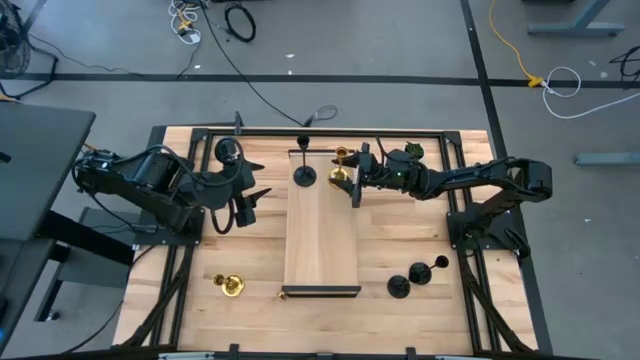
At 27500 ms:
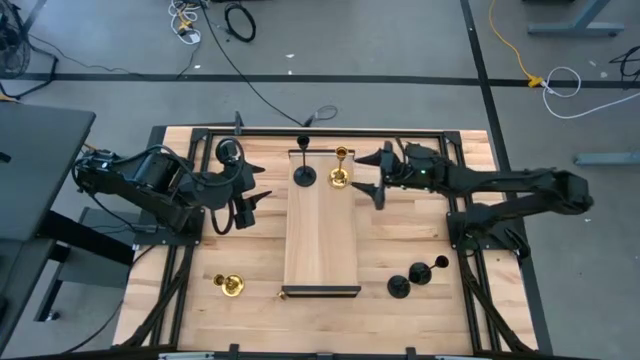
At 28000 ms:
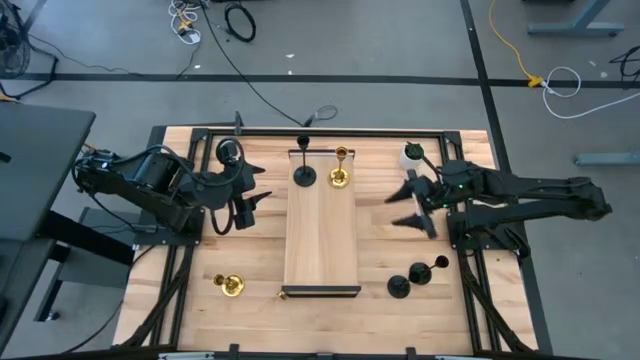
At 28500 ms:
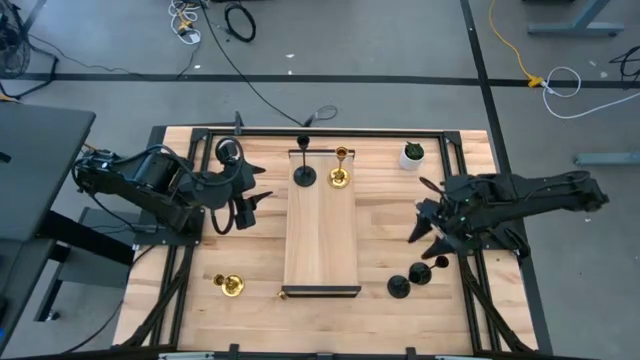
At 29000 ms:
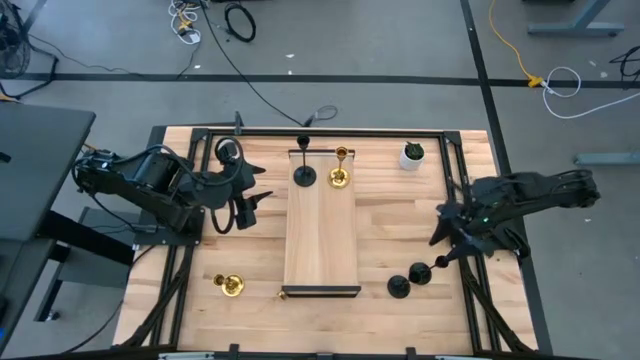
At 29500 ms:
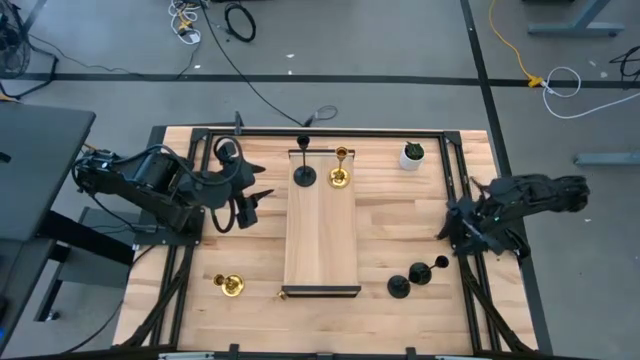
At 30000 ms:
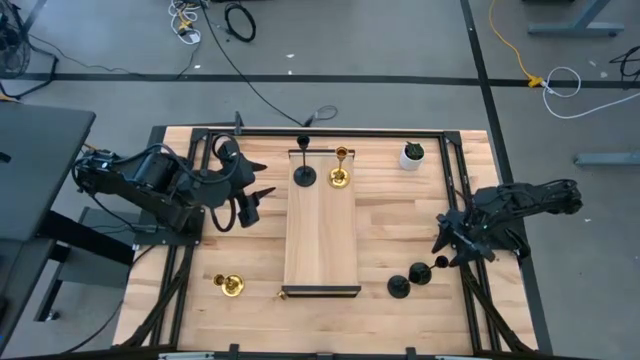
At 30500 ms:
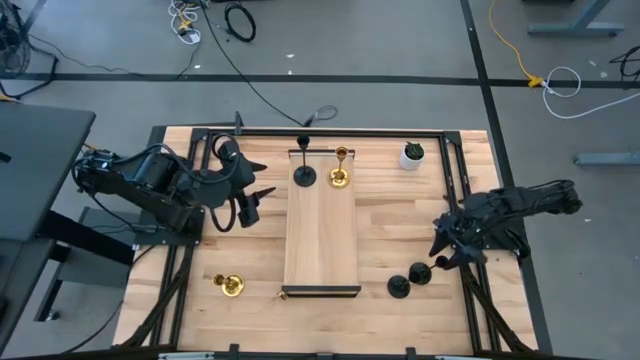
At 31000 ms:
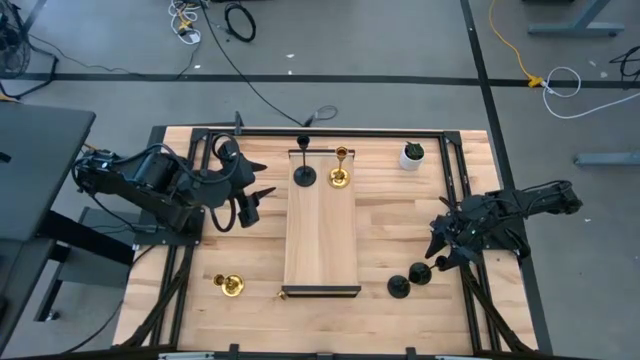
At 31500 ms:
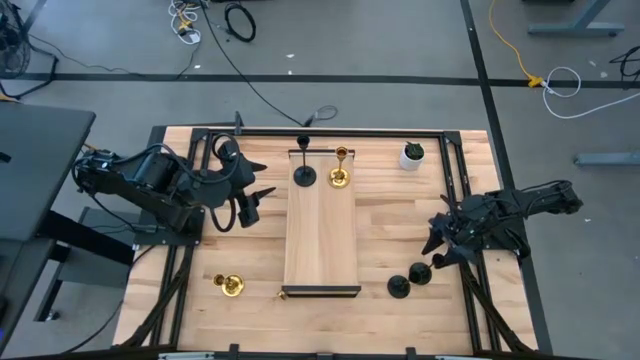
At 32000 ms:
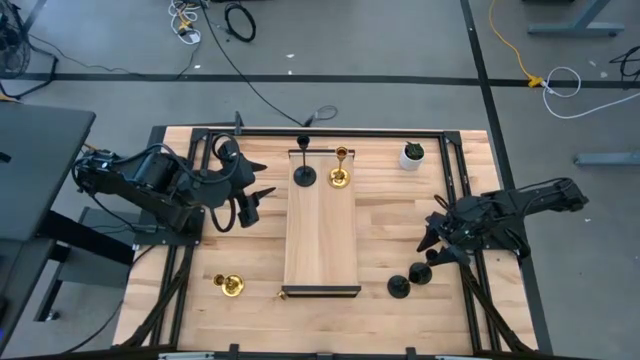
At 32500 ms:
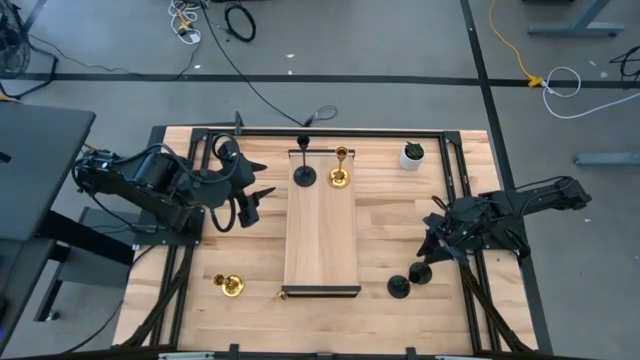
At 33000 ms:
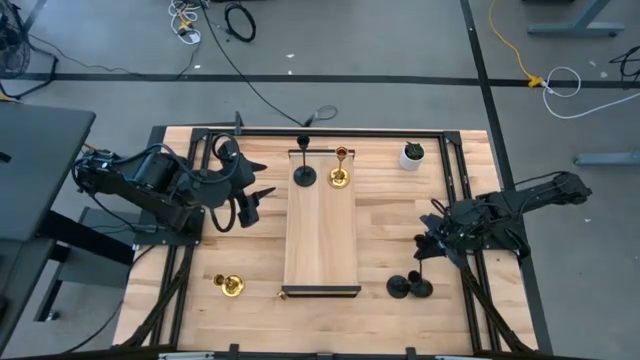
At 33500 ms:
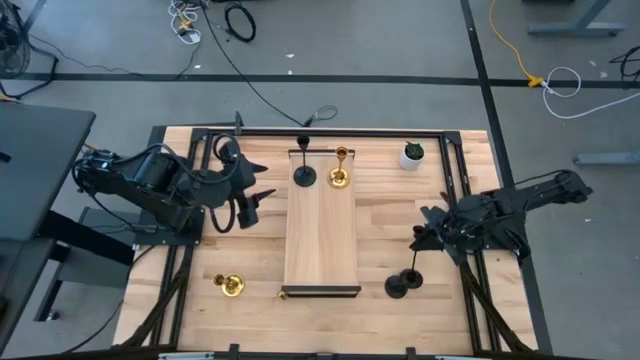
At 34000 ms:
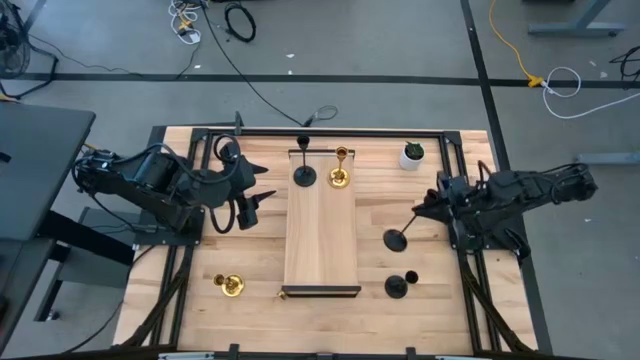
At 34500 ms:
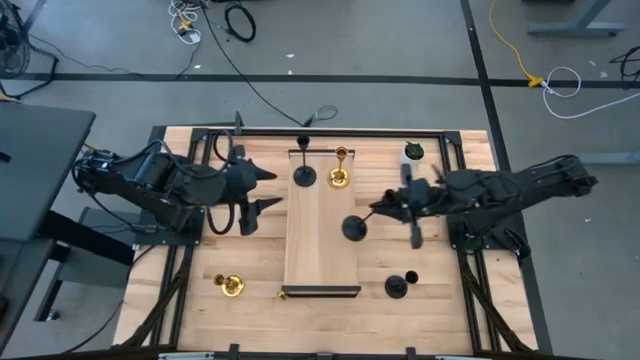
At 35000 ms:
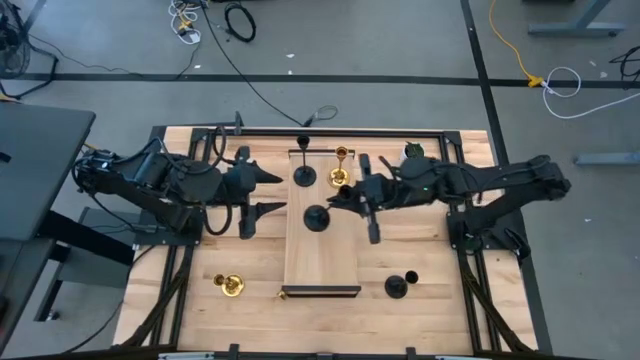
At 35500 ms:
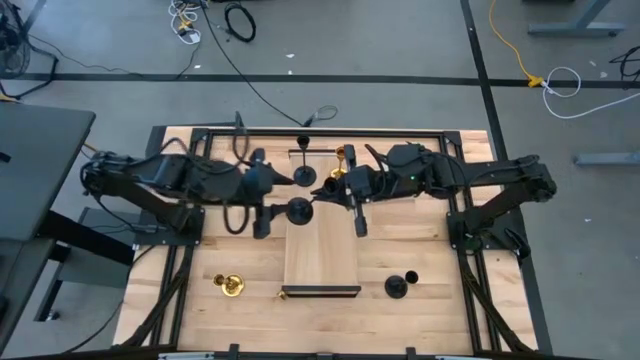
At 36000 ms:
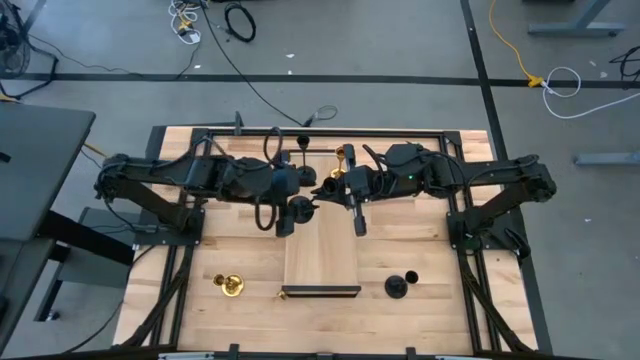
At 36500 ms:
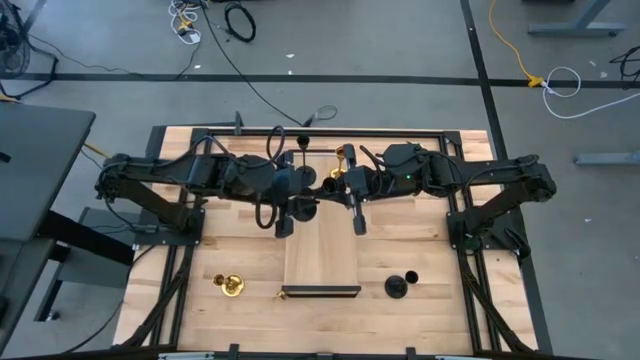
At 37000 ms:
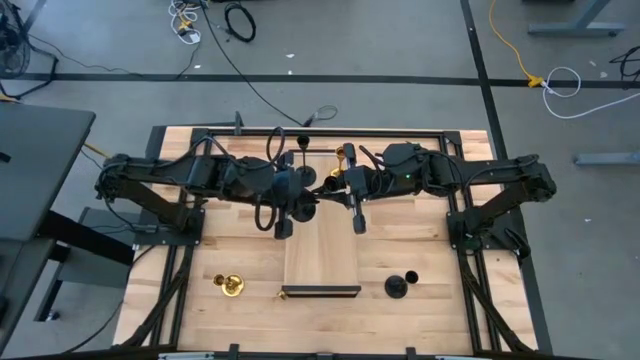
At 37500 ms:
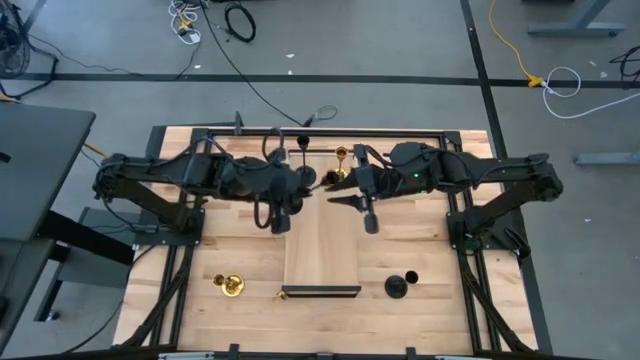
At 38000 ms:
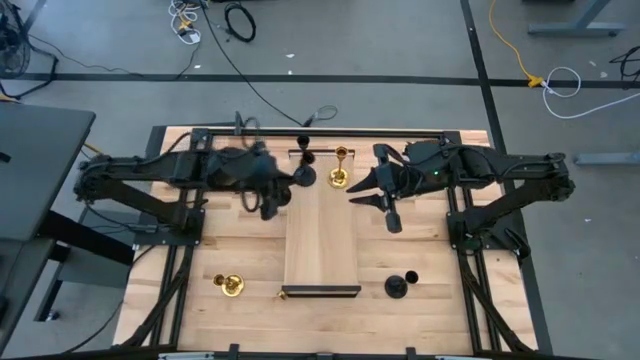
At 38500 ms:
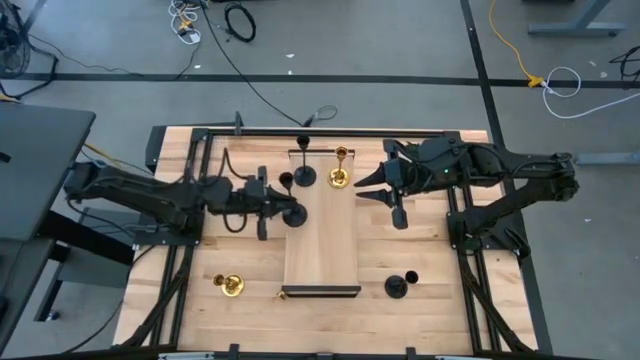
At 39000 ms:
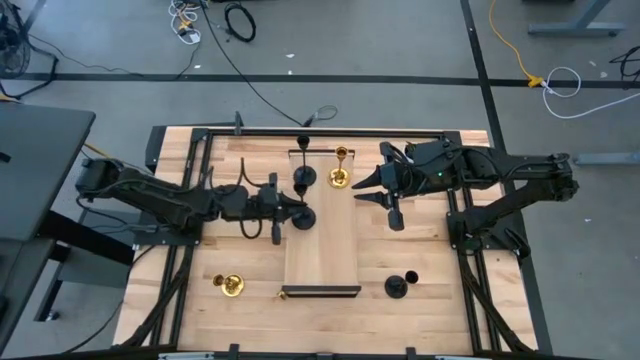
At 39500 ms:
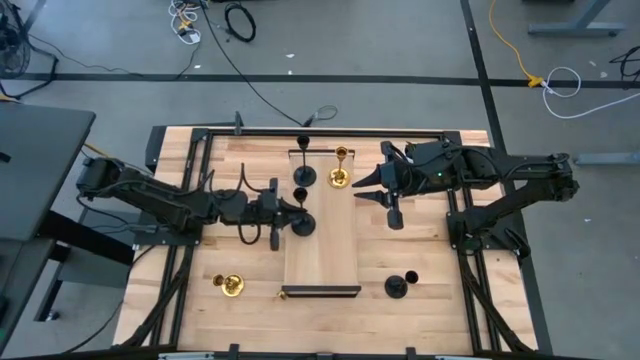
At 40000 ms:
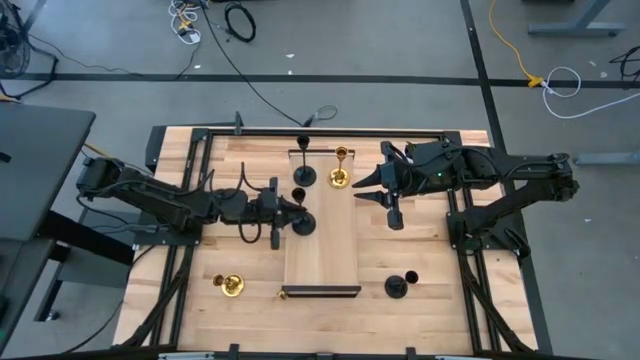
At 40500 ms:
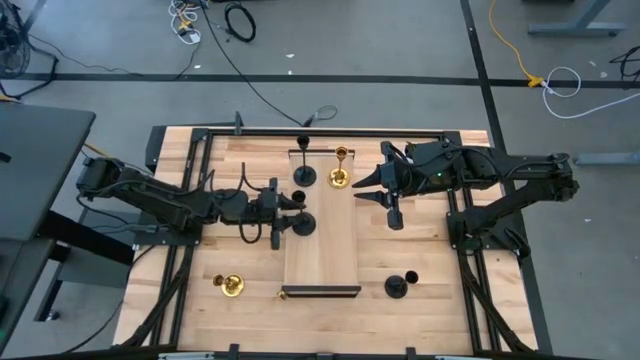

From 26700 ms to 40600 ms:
Task: Pick & Place candle stick holders
Put the black candle holder on the shelf aligned with the black candle holder

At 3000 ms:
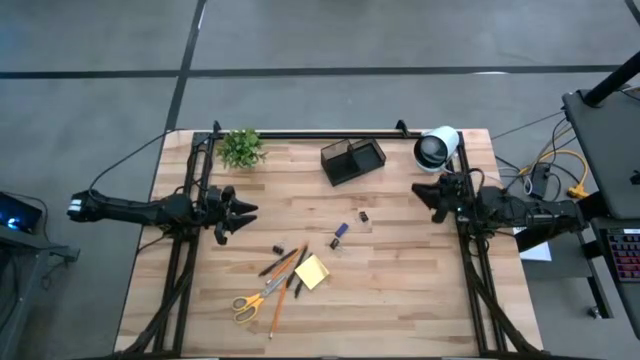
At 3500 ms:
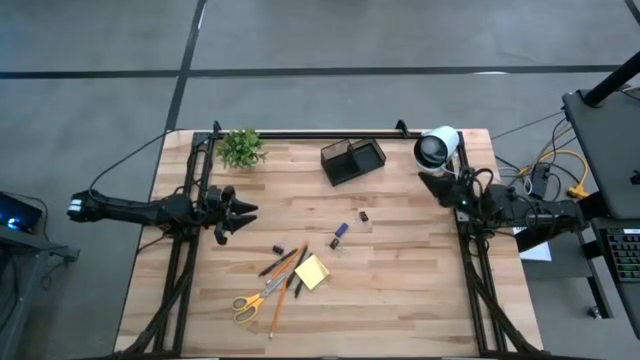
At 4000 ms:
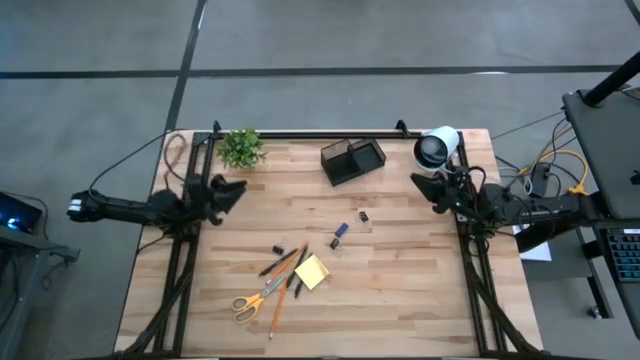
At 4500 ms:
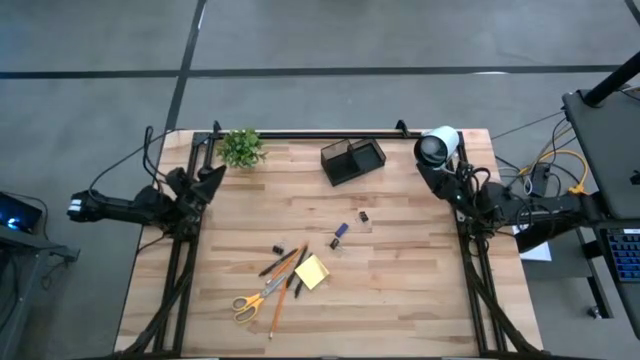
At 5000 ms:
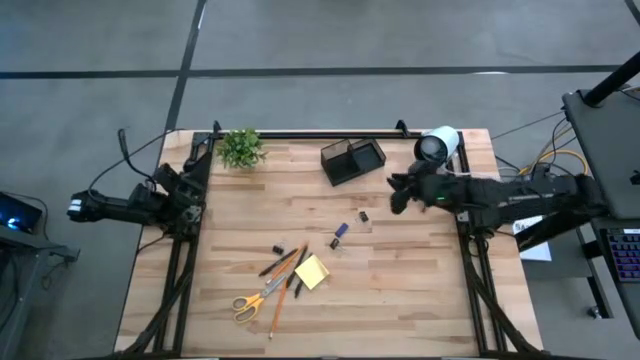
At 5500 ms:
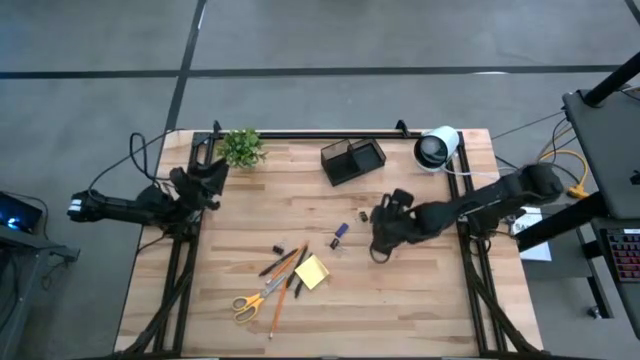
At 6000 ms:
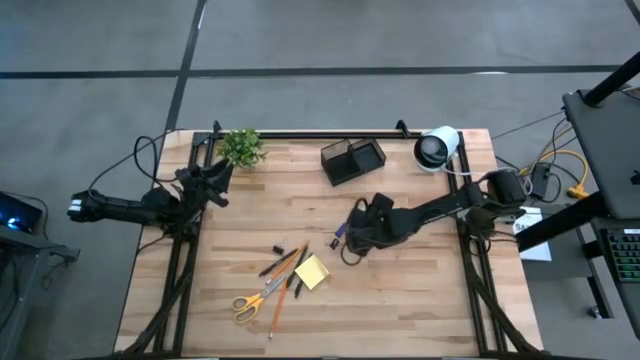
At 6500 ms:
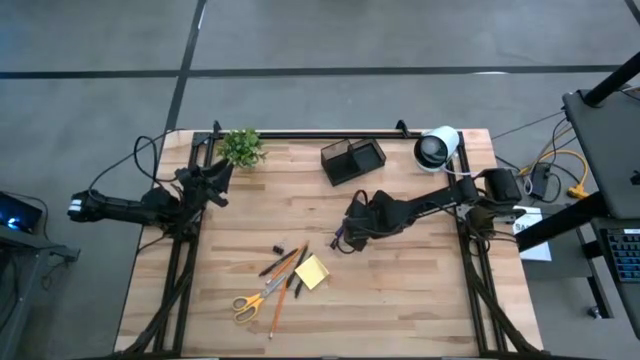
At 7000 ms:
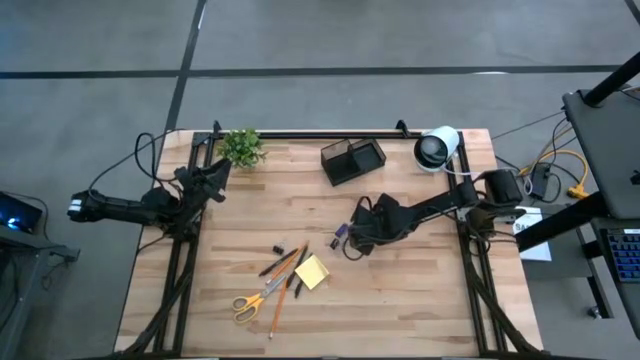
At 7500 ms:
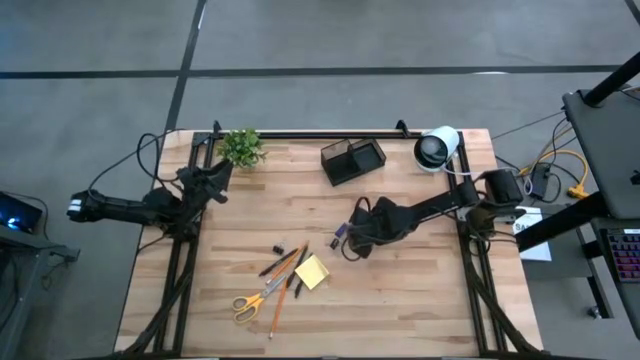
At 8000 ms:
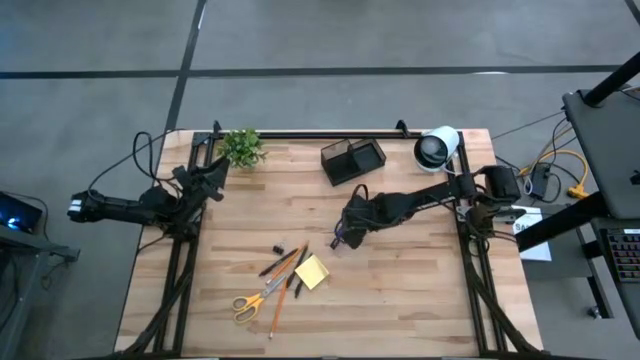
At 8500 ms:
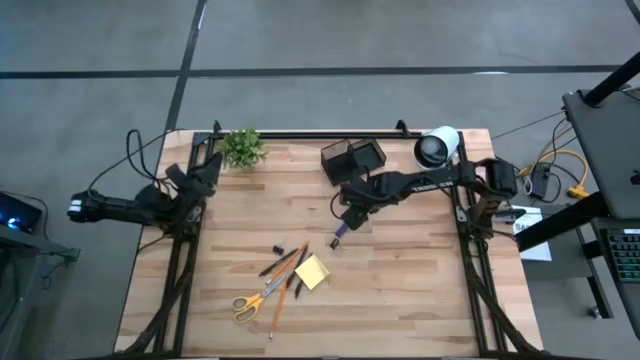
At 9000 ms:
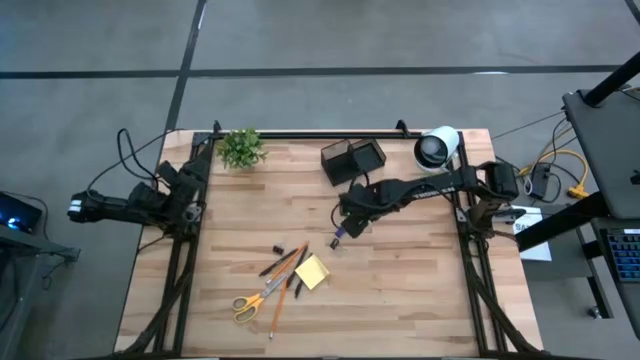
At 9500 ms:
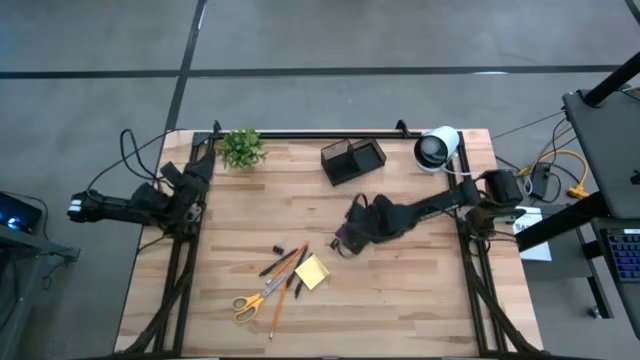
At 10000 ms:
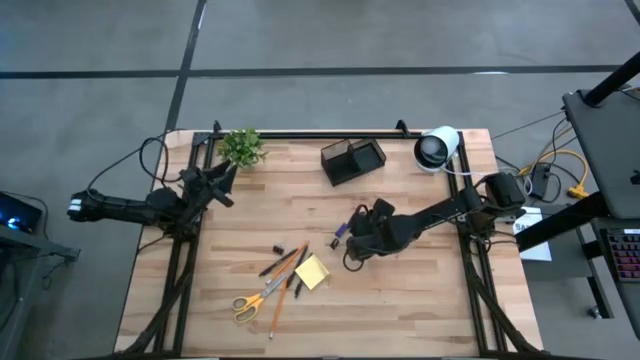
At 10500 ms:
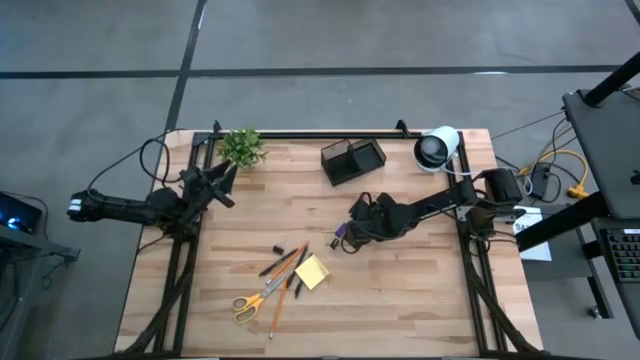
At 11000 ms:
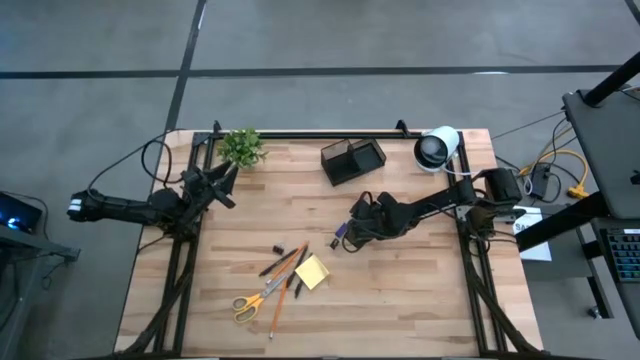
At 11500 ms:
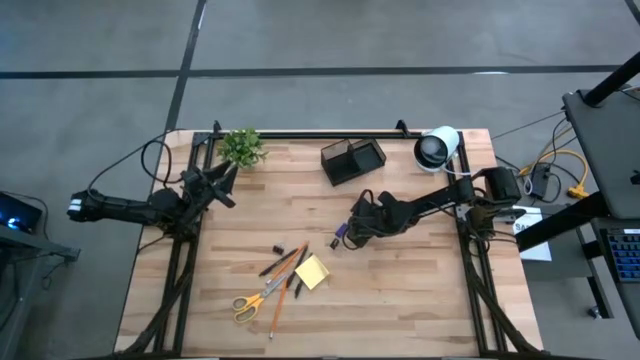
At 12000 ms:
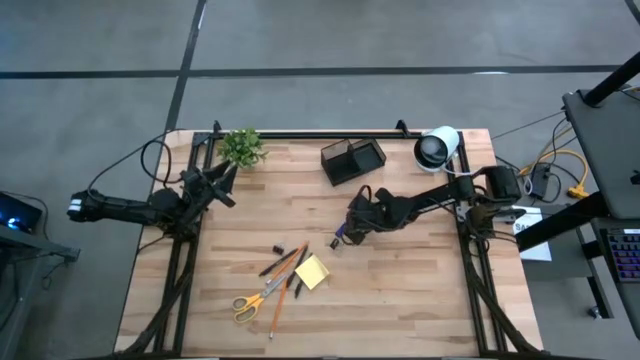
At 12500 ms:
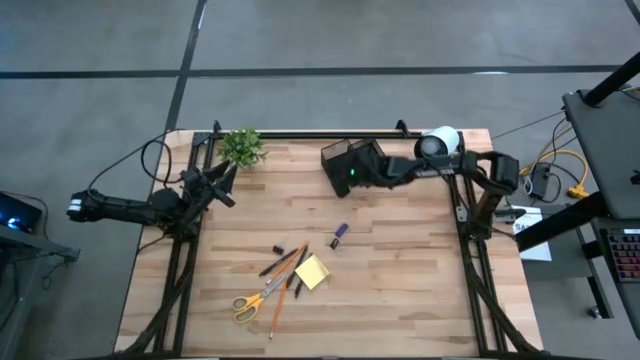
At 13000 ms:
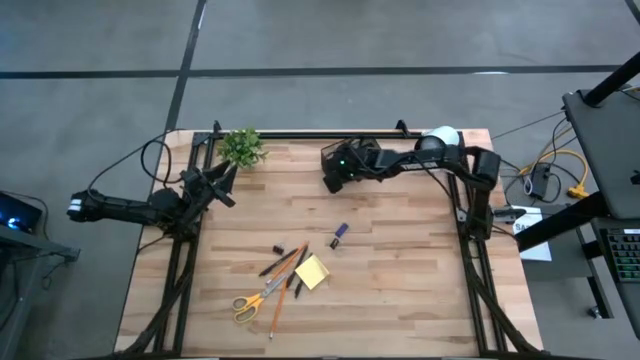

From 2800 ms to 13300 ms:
Task: Pick and place office supplies into organizer
Put the top black binder clip into the black desk organizer
